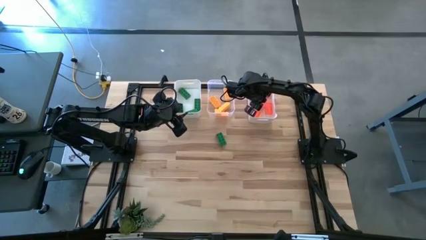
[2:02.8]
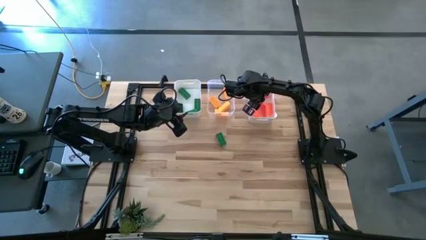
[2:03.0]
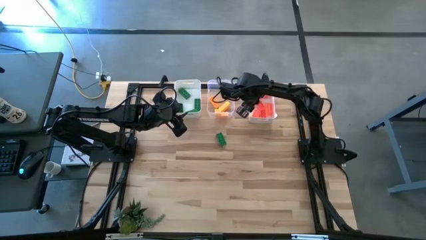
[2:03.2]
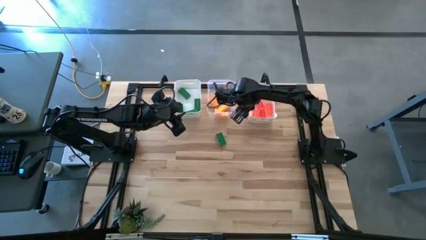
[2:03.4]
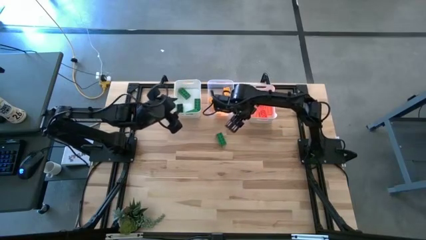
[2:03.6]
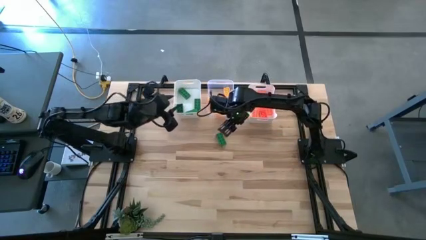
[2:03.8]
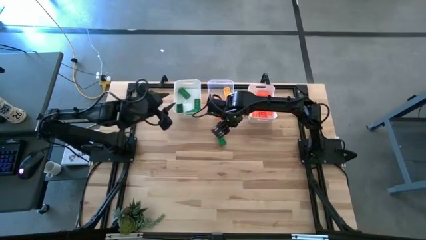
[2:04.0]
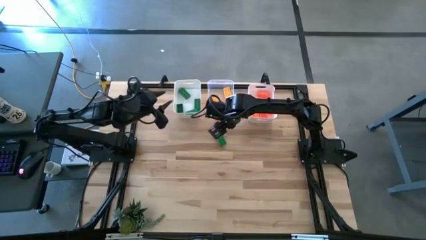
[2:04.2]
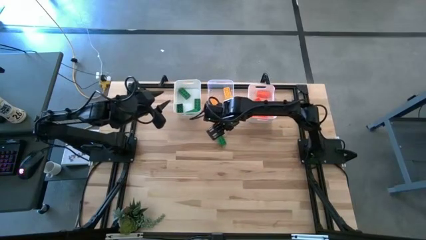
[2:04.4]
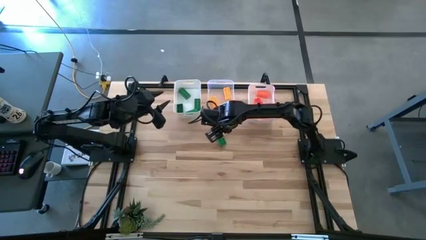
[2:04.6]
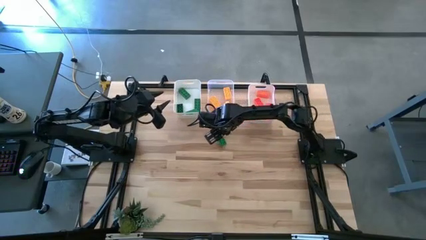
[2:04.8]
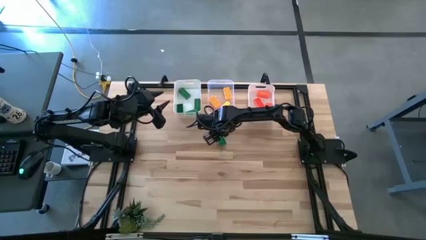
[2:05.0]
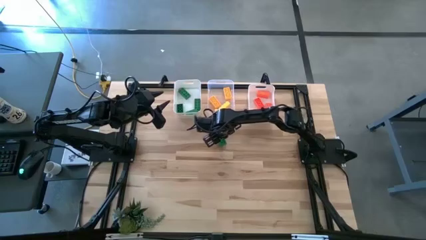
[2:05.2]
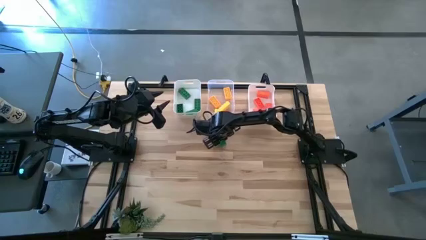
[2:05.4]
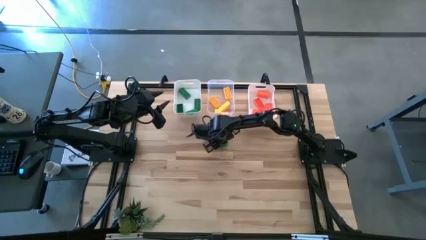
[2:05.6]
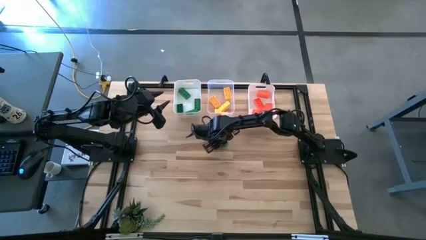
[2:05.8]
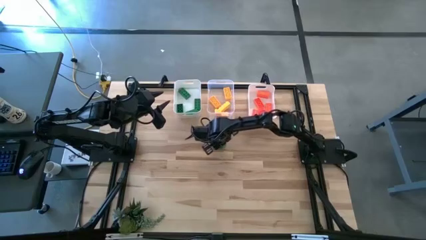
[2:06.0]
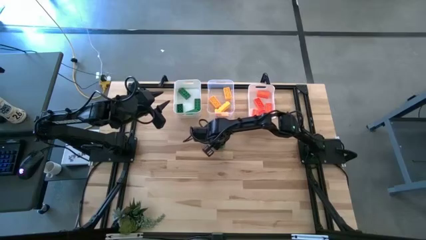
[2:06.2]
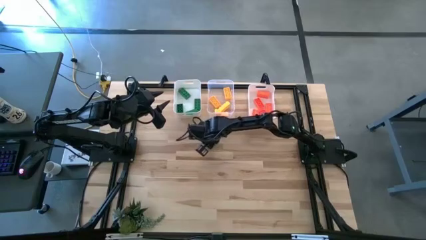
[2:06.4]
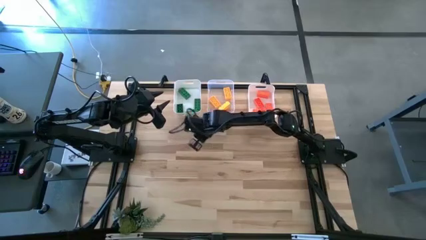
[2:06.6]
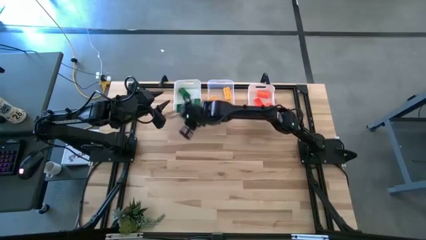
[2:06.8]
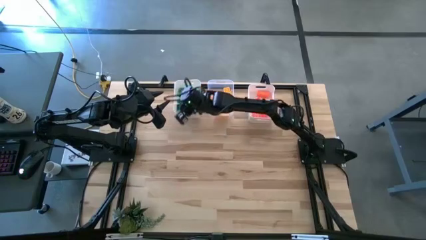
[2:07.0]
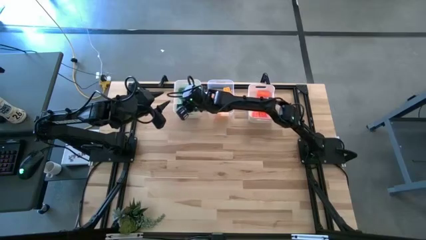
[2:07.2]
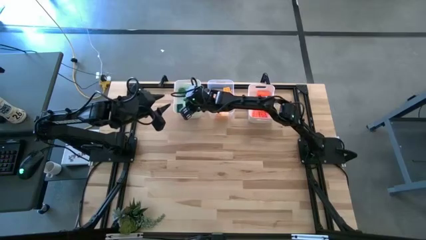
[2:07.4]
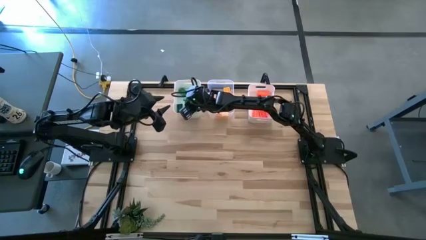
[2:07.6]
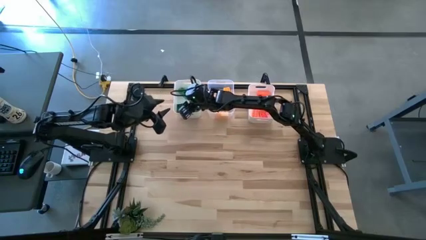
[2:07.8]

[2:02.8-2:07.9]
Task: Sort & place blocks by color
Put the green game piece into the left white bin

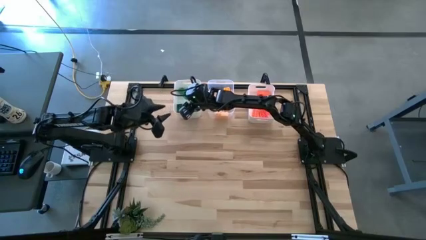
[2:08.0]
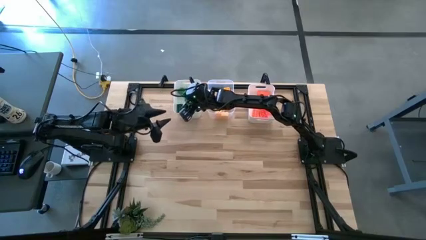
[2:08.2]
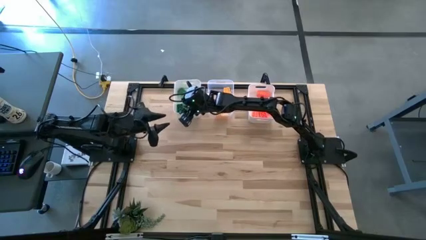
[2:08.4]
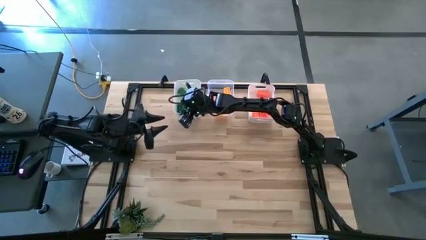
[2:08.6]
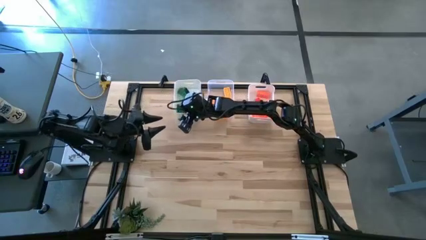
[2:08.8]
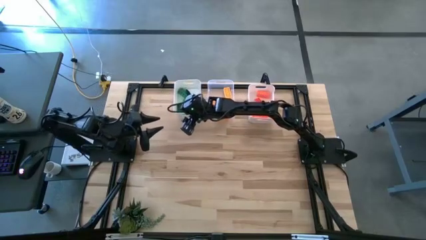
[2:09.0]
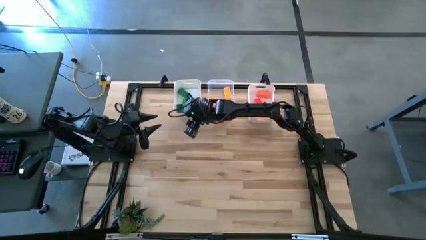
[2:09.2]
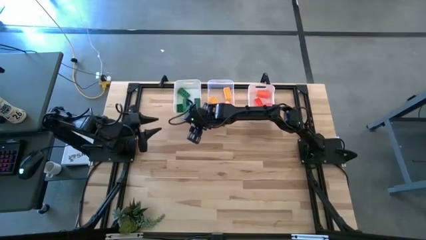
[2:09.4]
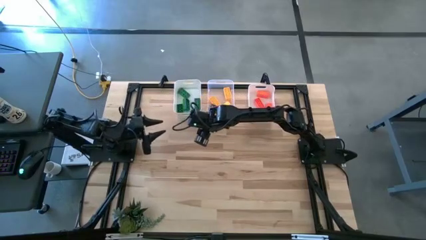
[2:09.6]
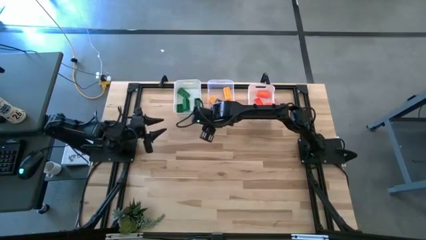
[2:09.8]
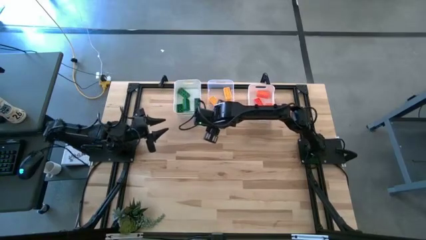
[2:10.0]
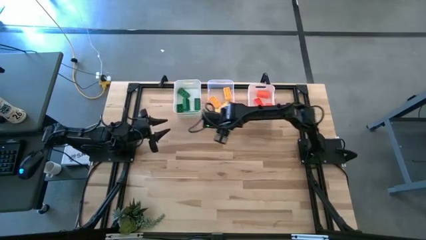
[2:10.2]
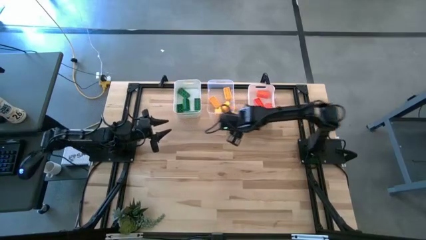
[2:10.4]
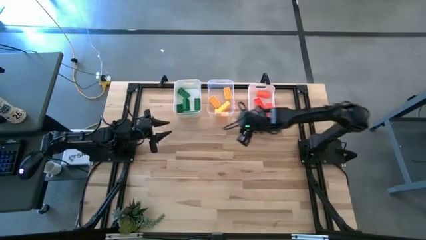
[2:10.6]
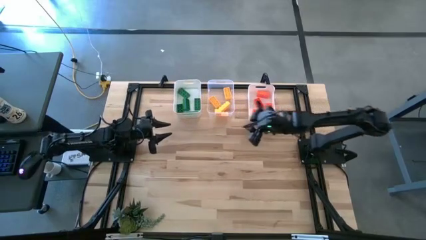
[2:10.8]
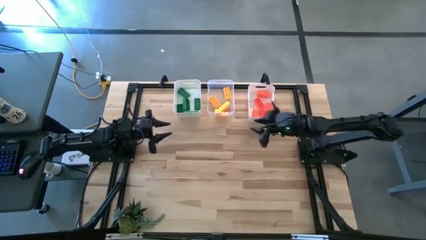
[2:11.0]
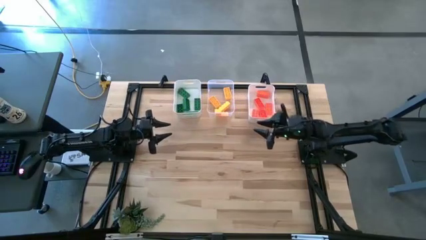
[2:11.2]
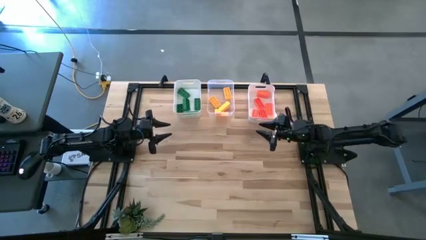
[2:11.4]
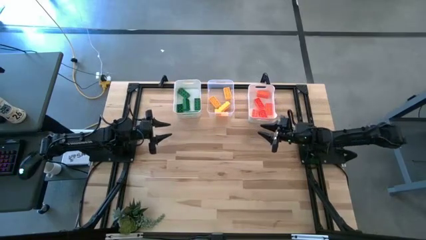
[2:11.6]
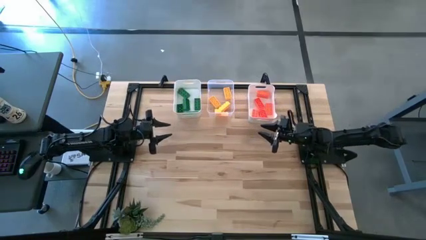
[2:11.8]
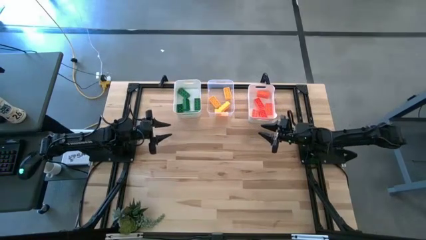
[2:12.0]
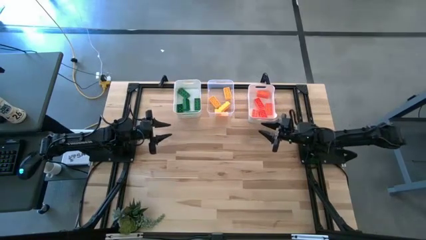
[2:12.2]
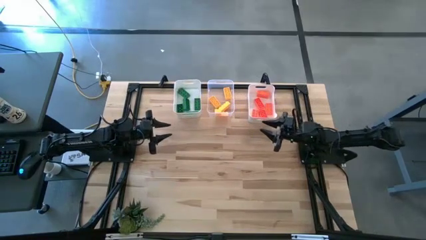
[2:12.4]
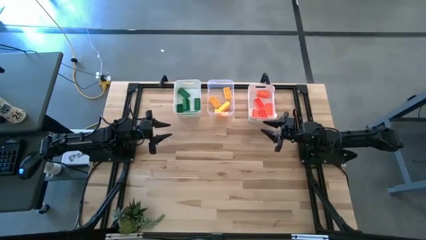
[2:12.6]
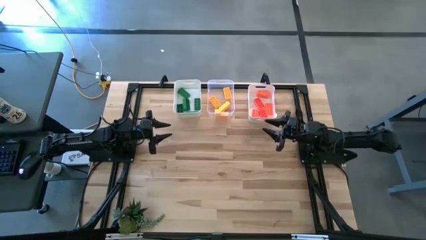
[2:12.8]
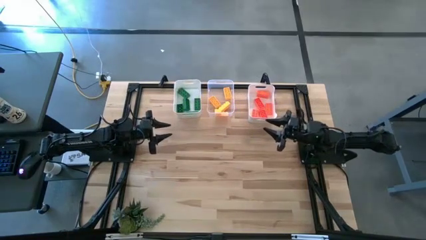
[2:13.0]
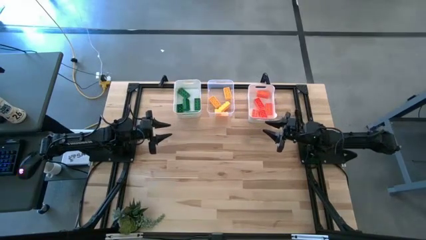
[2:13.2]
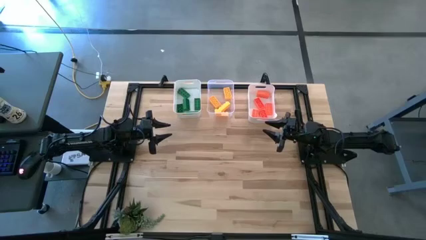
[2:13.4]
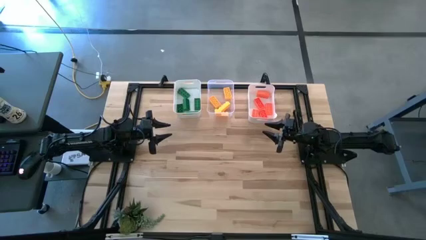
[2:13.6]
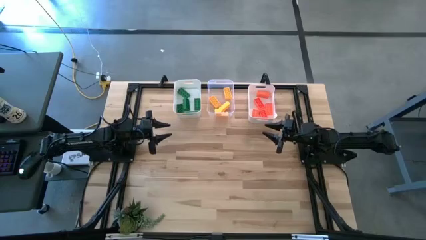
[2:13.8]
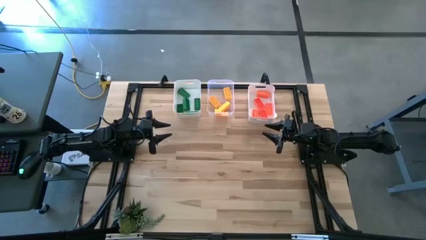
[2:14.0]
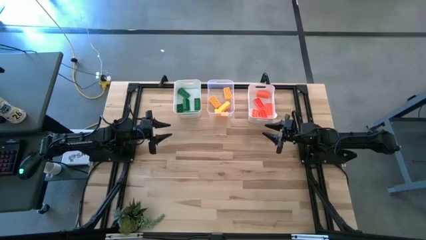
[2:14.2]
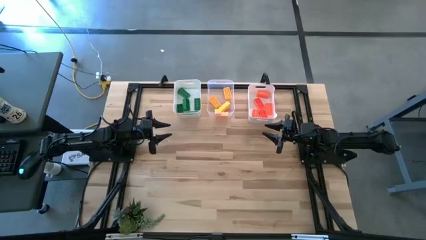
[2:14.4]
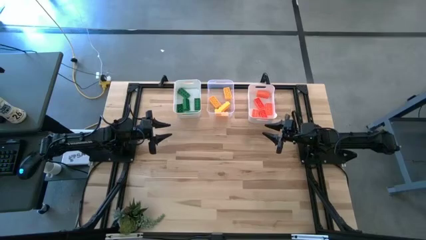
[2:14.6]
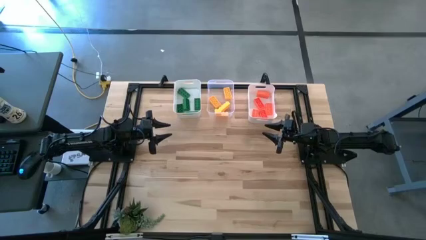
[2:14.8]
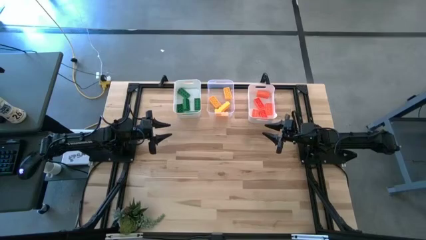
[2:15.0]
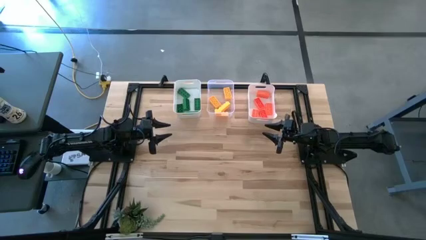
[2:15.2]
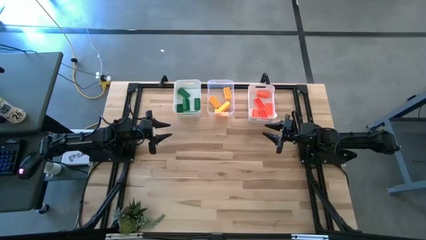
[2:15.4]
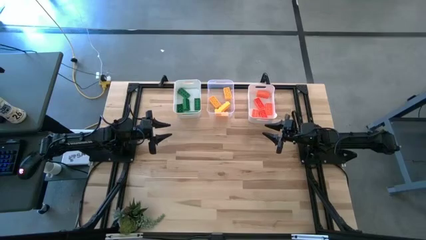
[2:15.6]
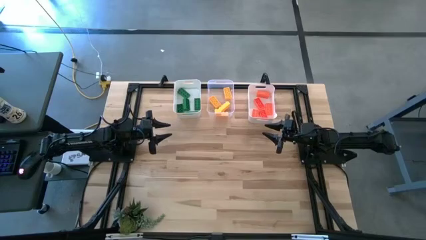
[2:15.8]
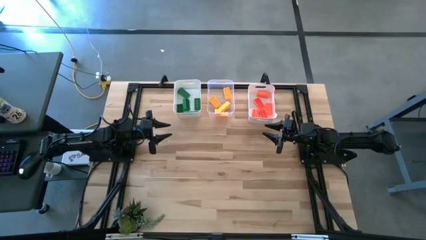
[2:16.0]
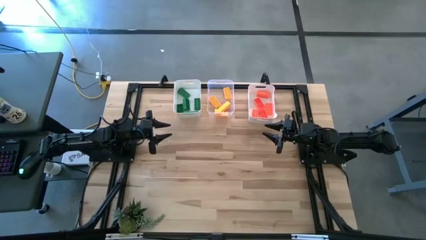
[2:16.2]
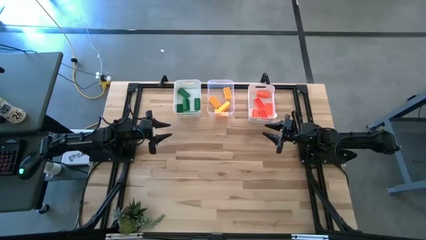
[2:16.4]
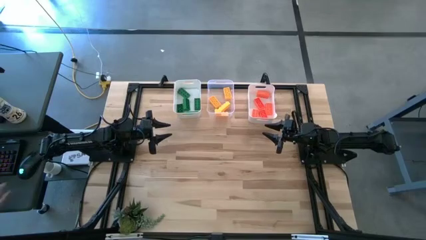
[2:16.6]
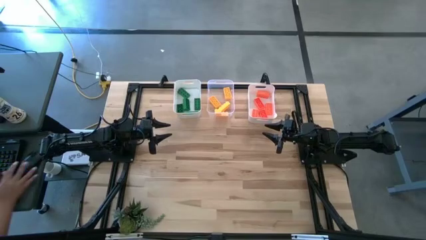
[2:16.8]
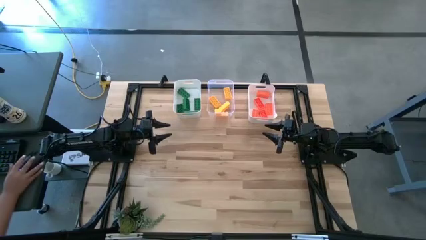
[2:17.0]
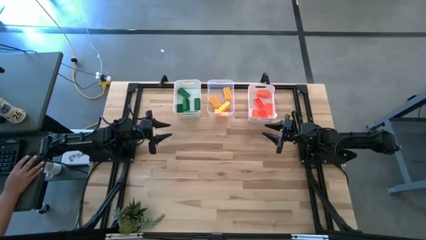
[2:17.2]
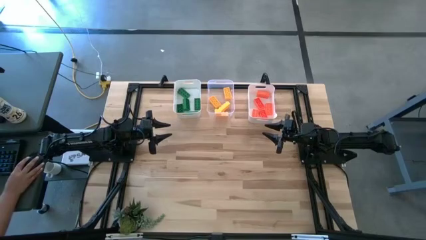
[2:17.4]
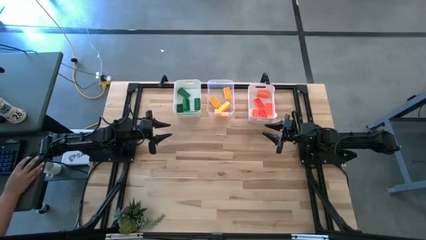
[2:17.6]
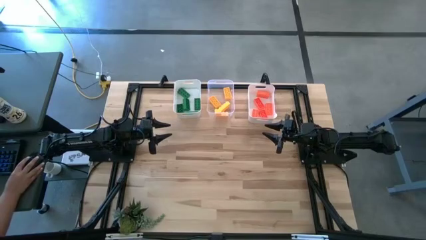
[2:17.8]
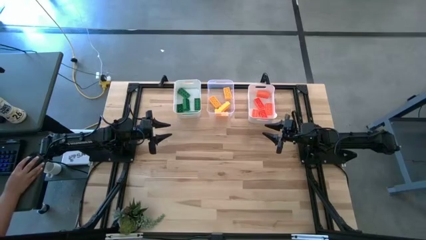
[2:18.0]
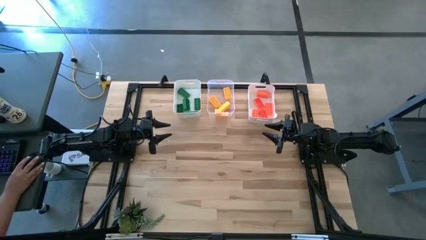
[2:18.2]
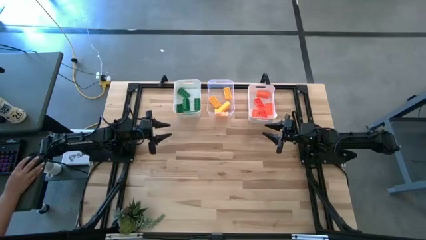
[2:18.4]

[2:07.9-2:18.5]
Return to Home Position

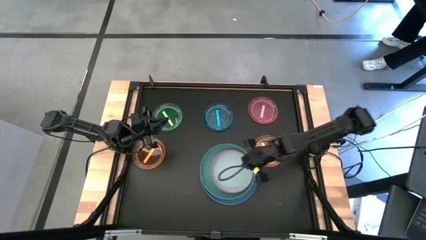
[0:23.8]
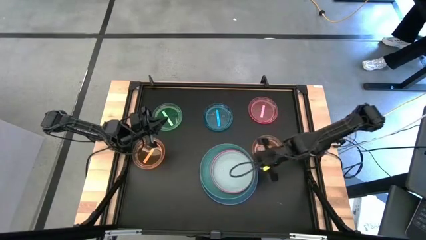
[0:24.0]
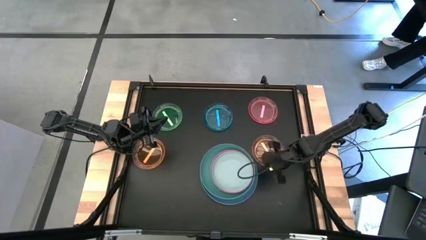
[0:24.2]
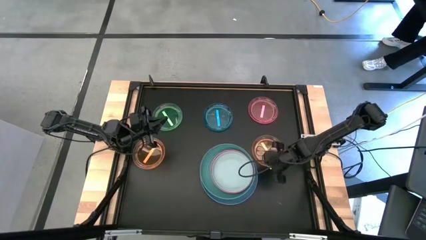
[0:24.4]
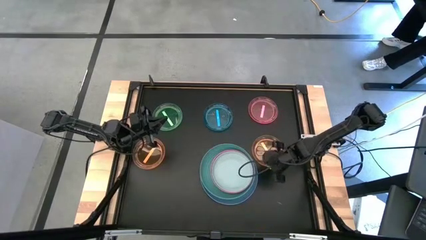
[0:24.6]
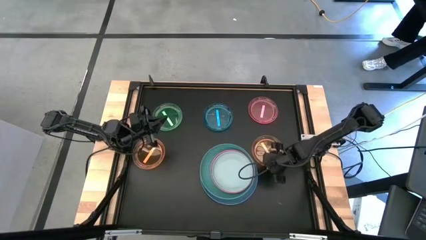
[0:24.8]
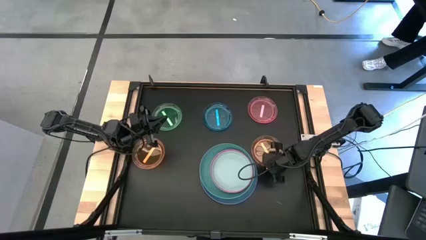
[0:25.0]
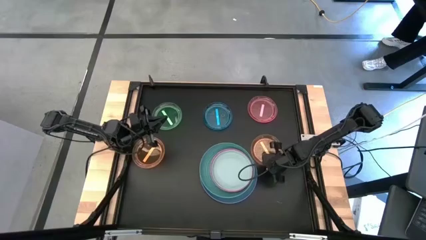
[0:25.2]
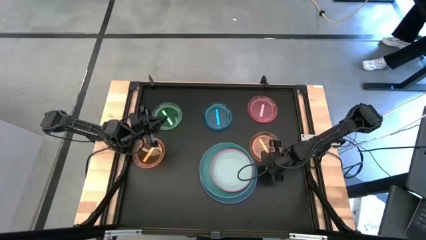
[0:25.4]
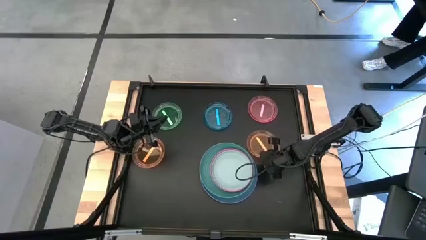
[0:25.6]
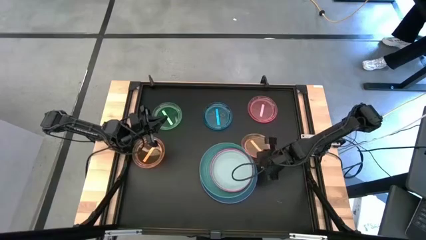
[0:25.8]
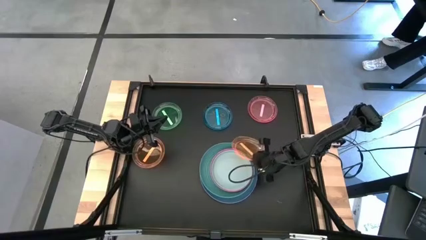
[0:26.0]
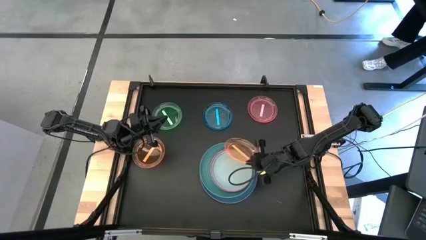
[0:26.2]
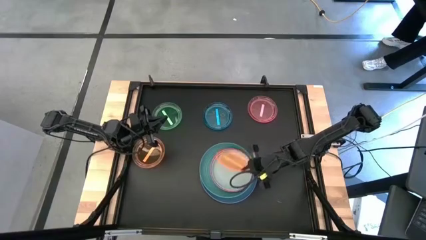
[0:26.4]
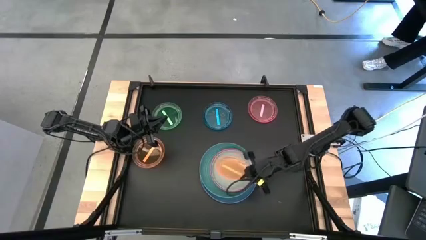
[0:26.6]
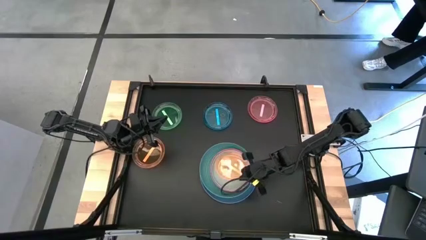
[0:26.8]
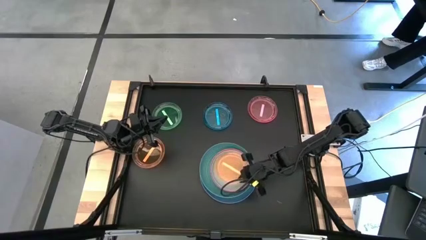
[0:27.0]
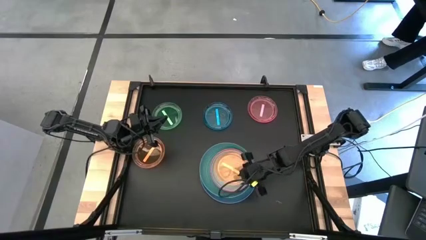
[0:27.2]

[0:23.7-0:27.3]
Task: Stack plastic plates
Stack the right orange transparent plate on top of the gray plate
